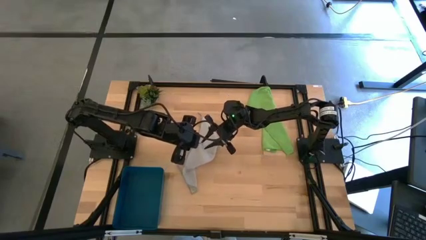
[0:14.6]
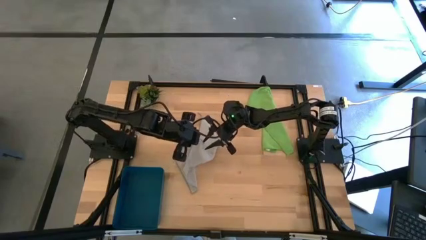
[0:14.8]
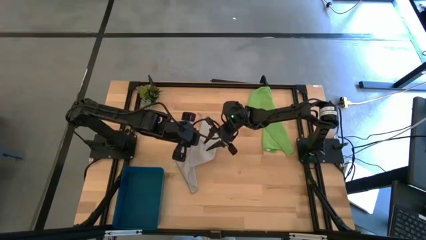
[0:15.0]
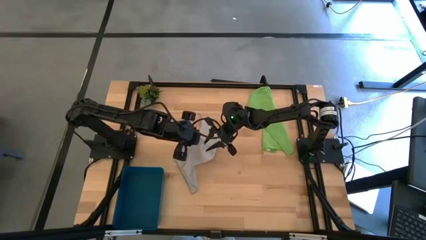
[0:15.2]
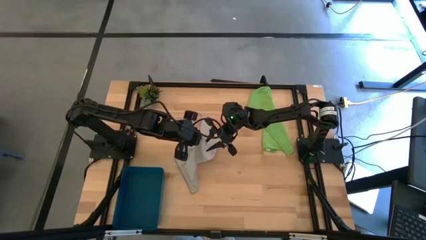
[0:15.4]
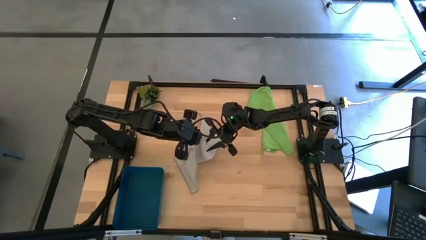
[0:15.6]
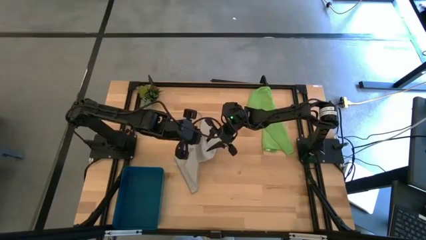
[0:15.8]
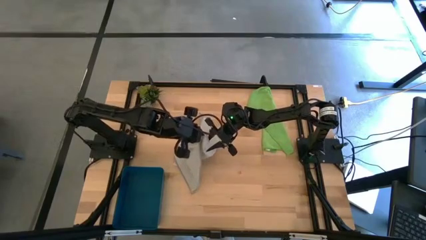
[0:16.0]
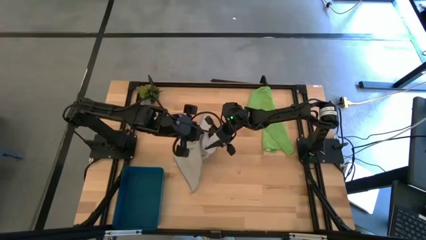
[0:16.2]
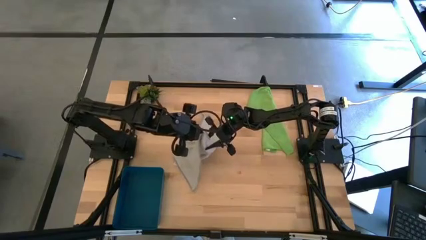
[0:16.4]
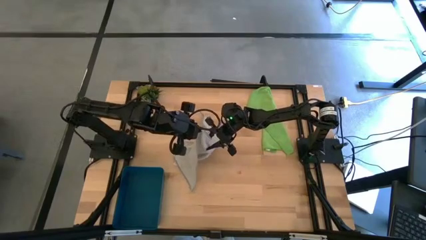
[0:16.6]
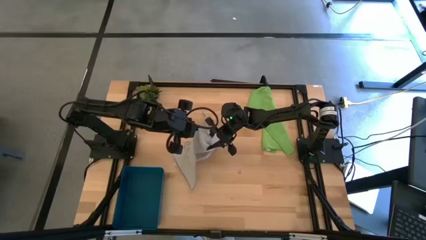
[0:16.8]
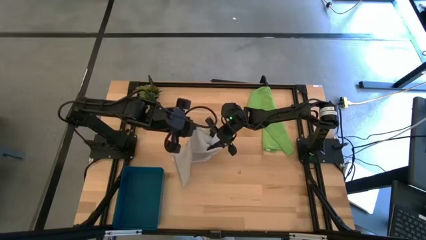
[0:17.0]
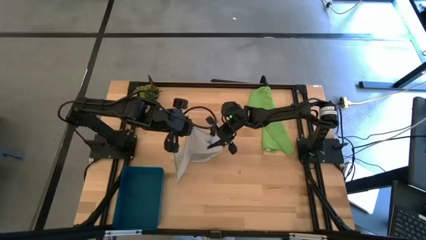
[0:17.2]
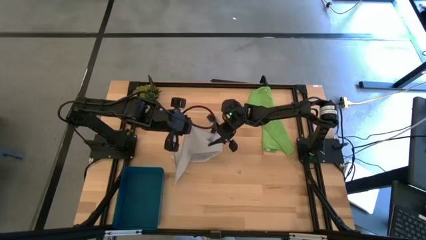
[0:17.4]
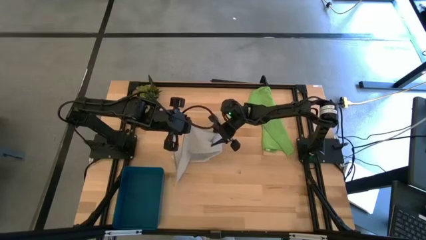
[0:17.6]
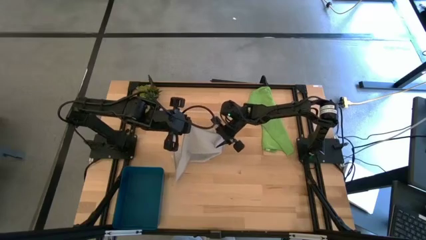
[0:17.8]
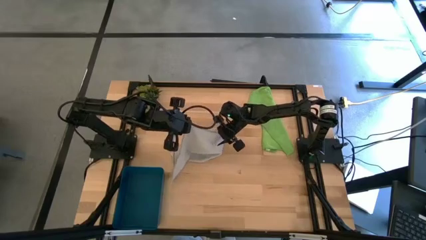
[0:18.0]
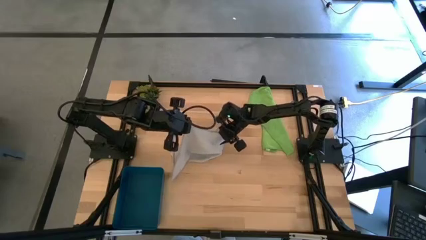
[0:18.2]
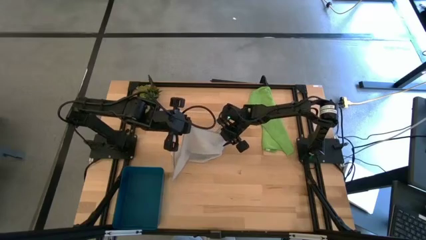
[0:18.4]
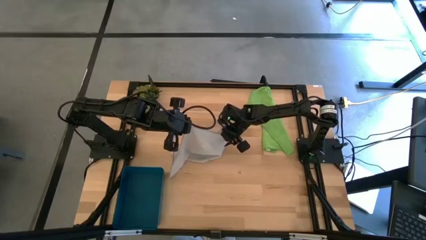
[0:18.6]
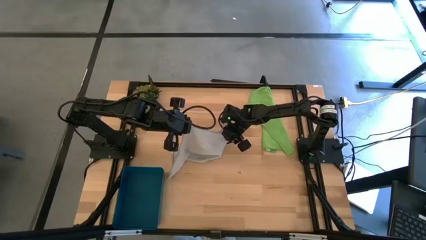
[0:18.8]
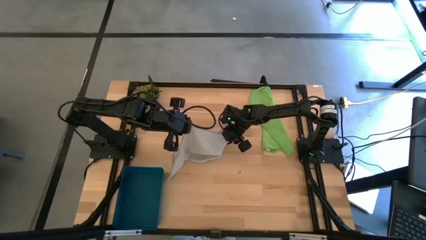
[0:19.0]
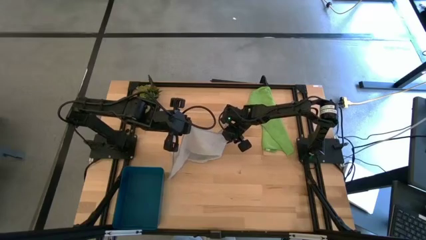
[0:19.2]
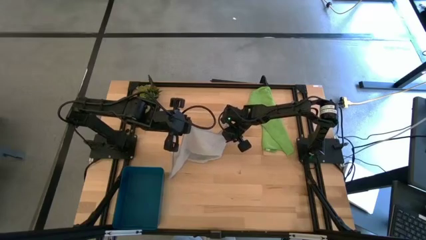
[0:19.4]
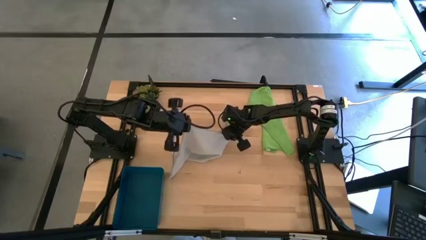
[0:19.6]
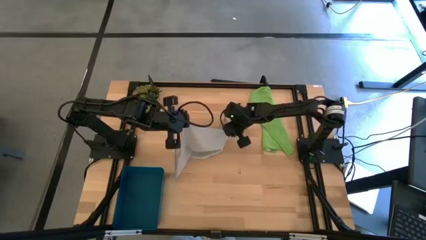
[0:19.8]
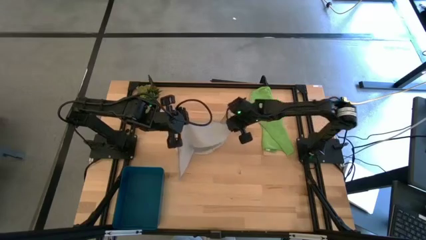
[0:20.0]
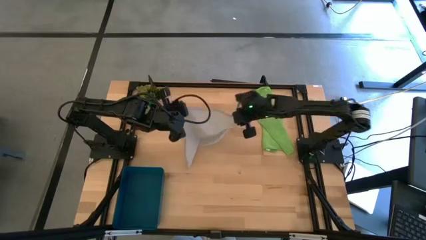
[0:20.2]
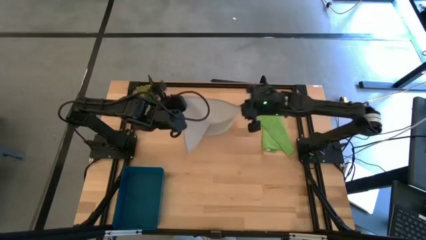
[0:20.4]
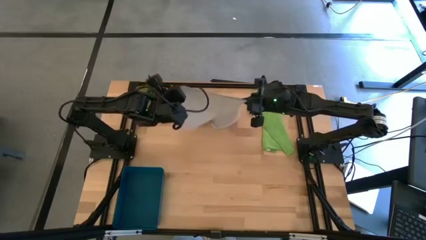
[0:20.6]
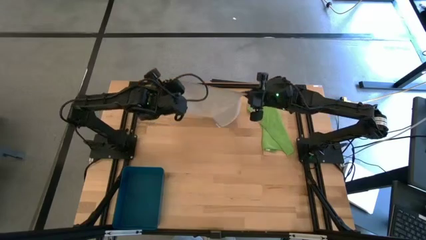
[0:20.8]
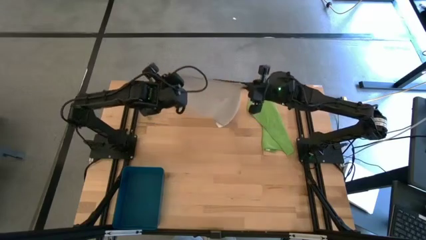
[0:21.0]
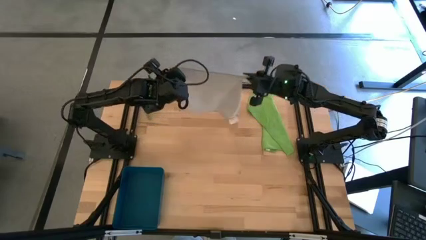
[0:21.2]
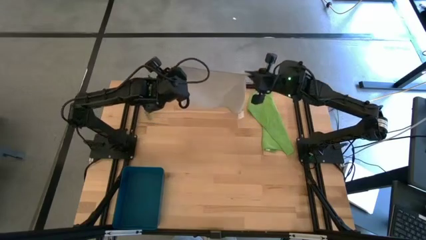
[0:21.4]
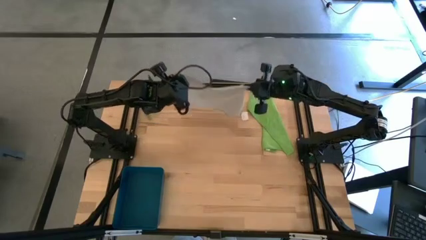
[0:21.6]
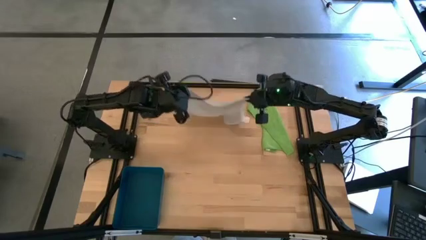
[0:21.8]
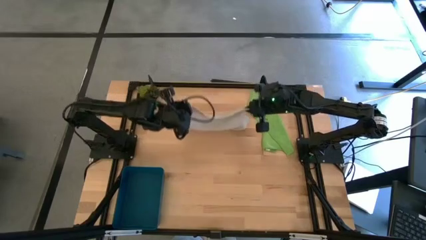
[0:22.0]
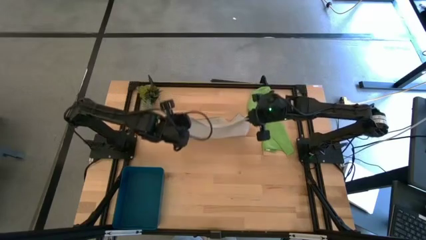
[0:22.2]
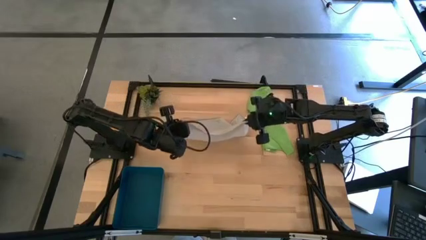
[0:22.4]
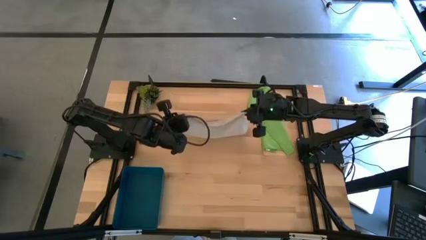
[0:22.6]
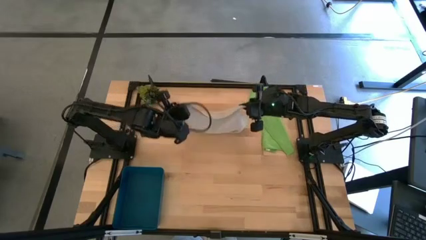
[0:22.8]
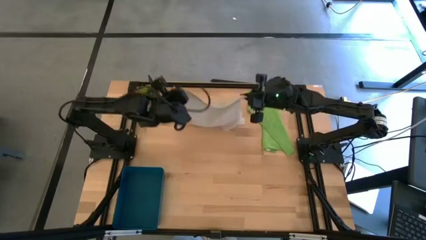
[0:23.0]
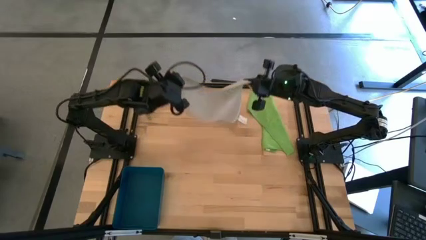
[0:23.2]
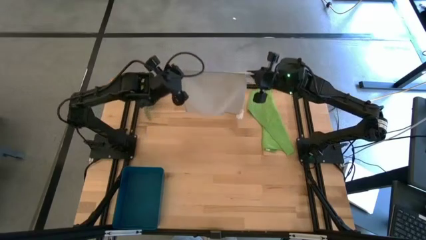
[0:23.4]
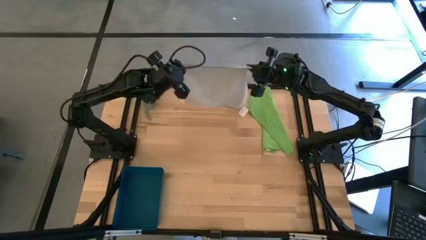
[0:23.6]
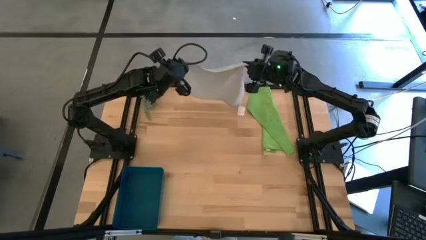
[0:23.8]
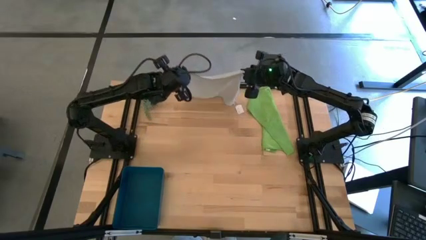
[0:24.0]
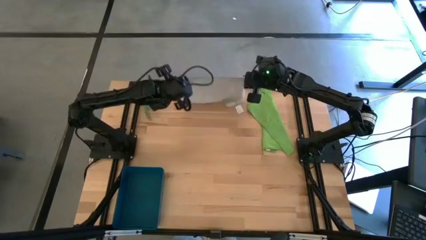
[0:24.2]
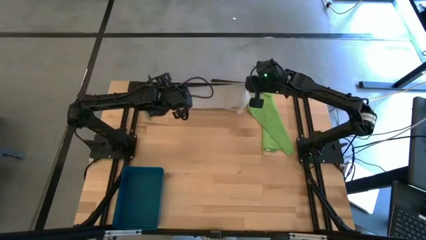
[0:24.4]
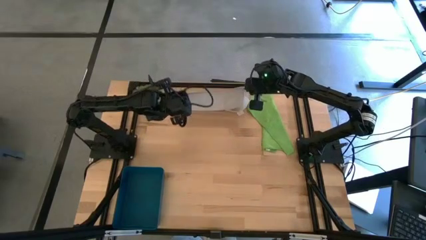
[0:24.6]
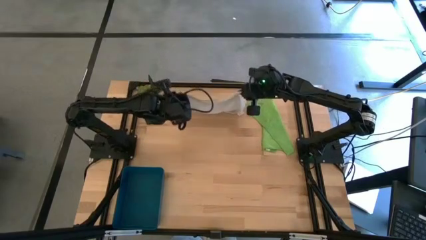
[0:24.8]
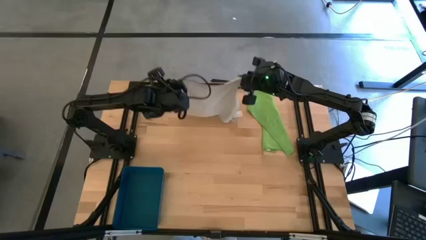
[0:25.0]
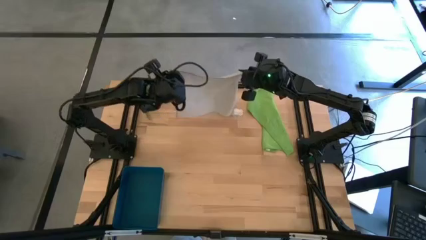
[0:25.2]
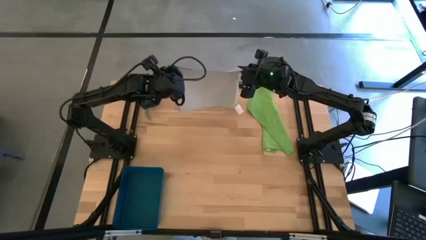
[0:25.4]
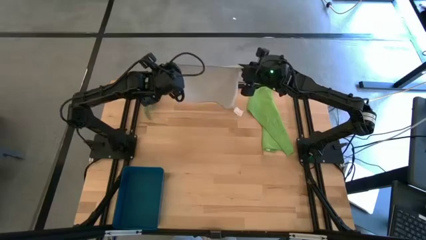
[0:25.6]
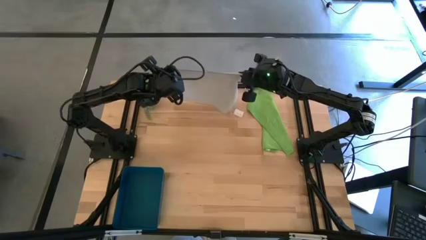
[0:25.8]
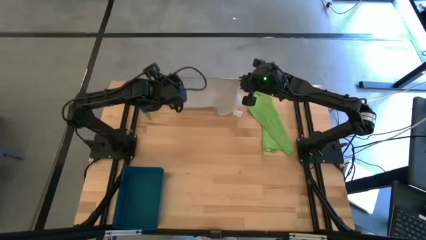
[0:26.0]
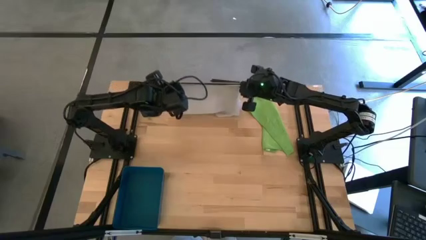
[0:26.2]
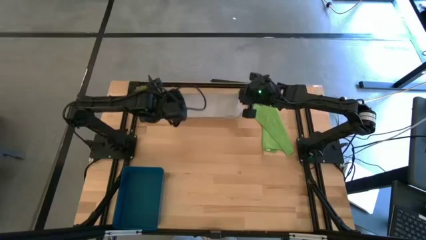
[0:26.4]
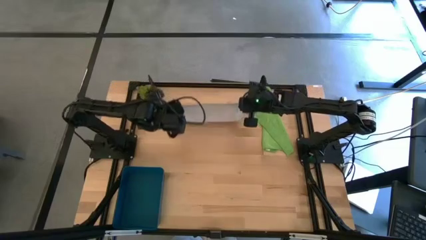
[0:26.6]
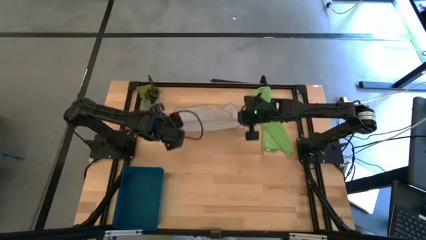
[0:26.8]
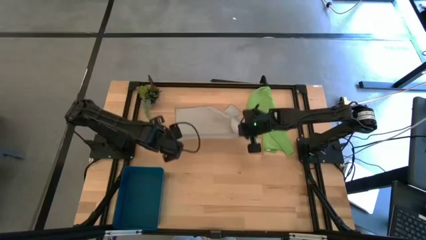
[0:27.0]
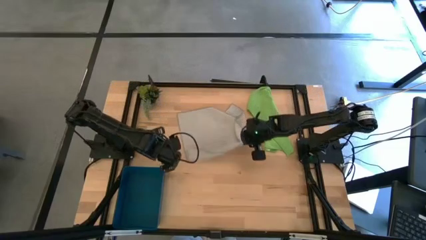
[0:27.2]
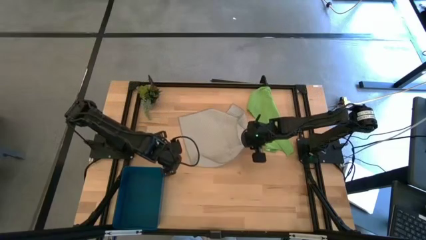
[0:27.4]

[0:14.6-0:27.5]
Task: Roll microfiber towels into tight, uniform cylinder then place into a basket
Roll the gray towel
